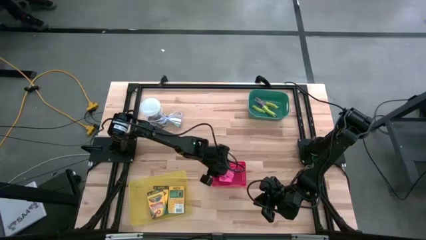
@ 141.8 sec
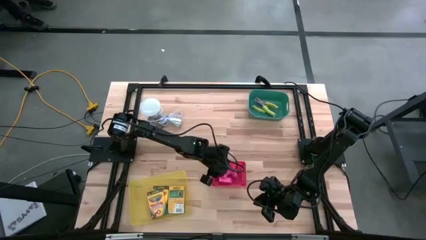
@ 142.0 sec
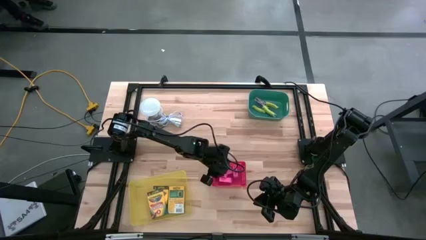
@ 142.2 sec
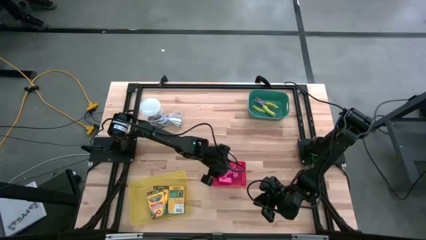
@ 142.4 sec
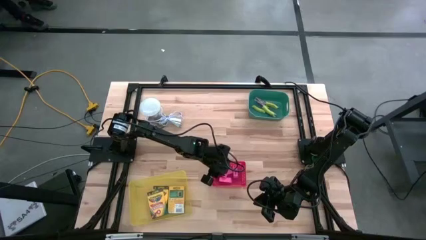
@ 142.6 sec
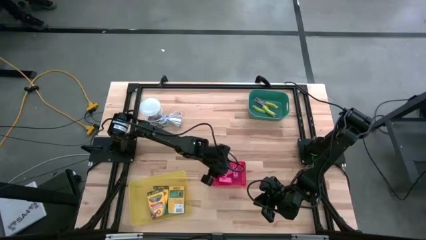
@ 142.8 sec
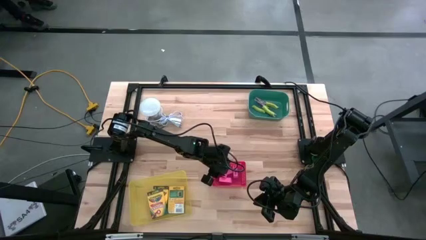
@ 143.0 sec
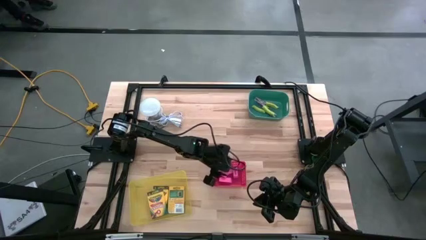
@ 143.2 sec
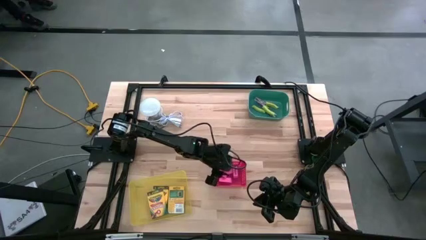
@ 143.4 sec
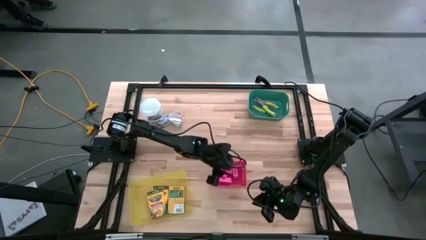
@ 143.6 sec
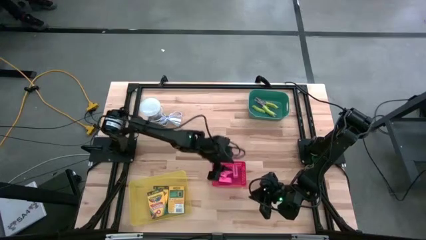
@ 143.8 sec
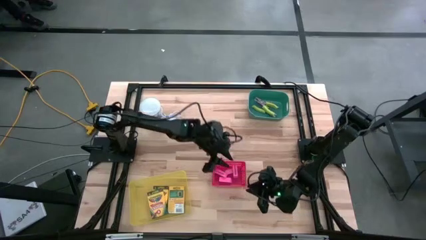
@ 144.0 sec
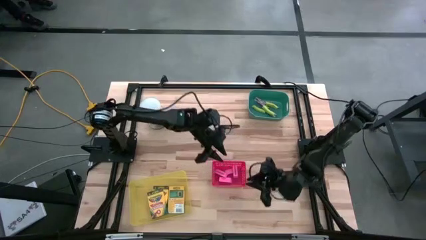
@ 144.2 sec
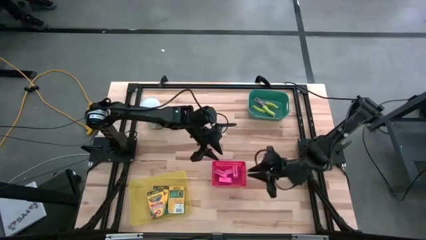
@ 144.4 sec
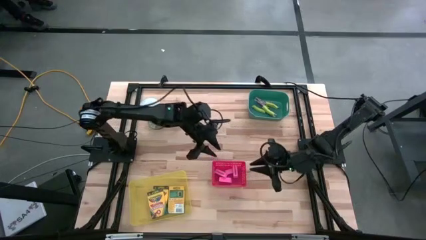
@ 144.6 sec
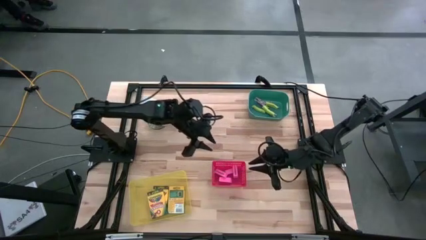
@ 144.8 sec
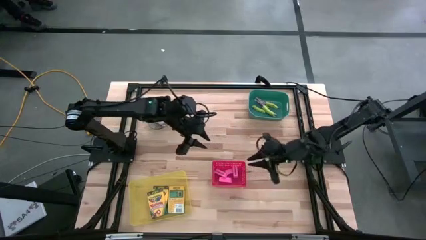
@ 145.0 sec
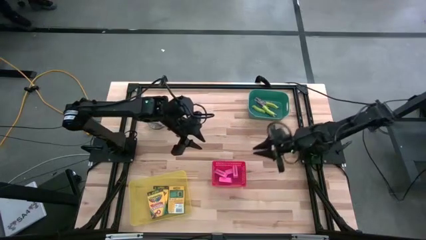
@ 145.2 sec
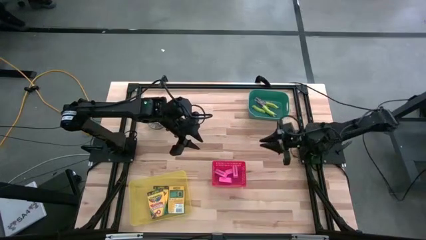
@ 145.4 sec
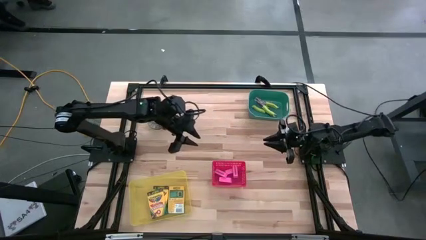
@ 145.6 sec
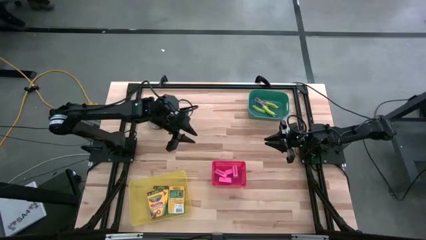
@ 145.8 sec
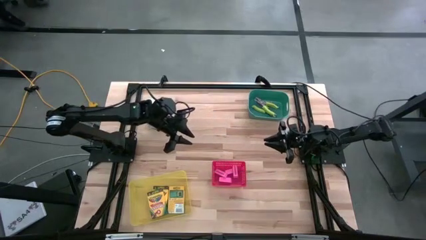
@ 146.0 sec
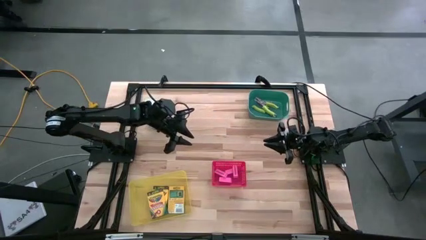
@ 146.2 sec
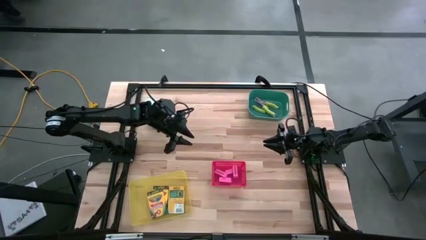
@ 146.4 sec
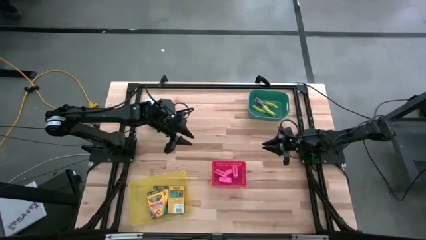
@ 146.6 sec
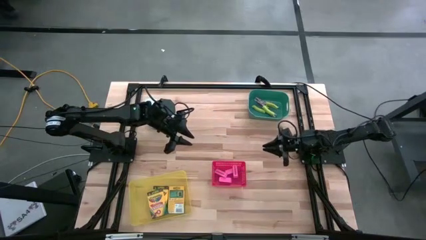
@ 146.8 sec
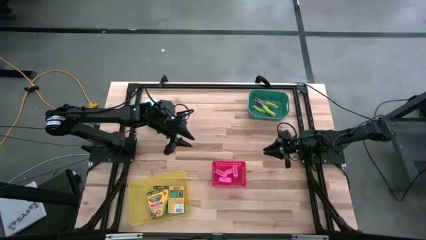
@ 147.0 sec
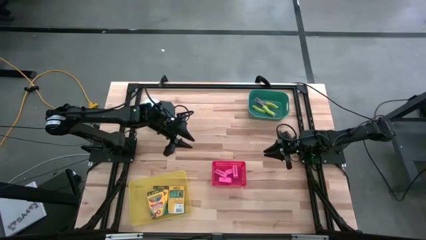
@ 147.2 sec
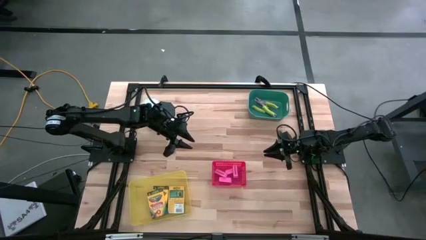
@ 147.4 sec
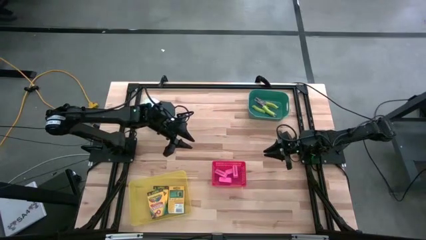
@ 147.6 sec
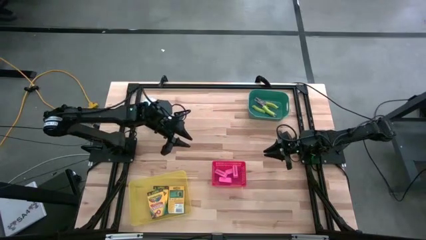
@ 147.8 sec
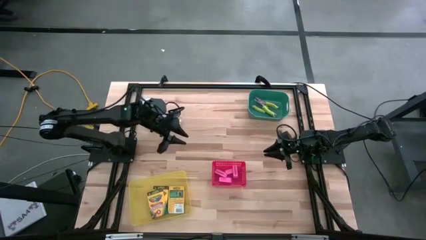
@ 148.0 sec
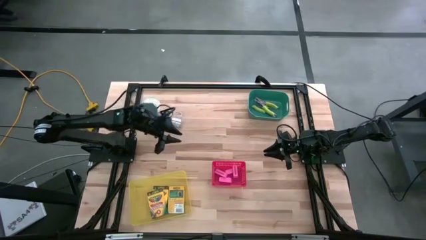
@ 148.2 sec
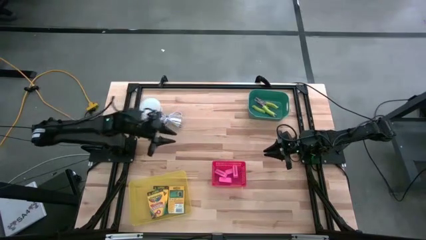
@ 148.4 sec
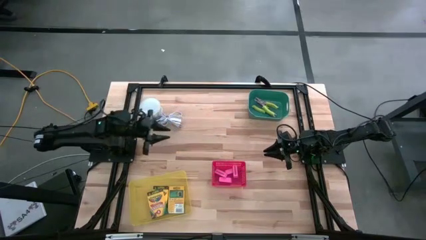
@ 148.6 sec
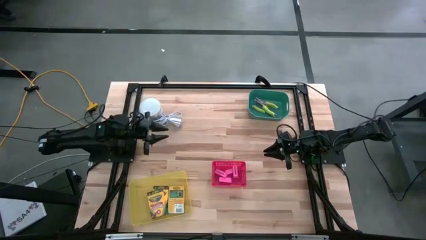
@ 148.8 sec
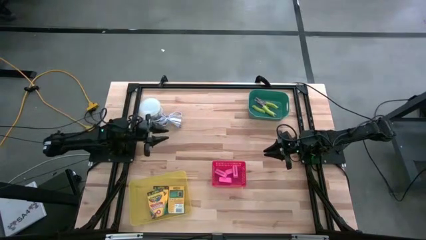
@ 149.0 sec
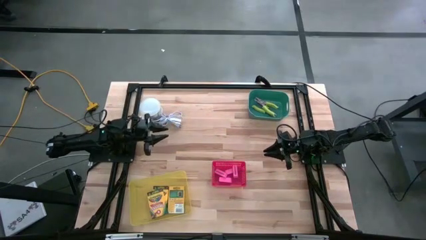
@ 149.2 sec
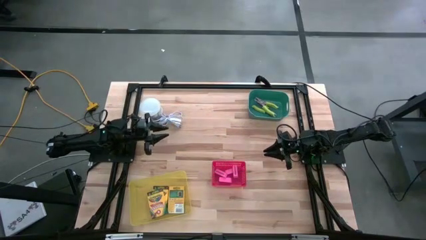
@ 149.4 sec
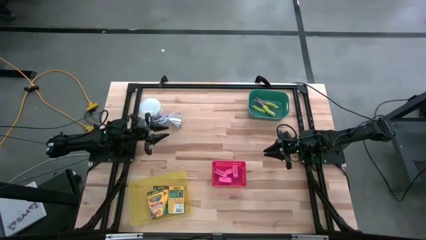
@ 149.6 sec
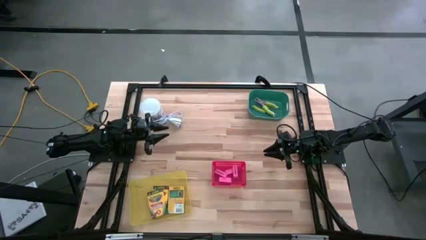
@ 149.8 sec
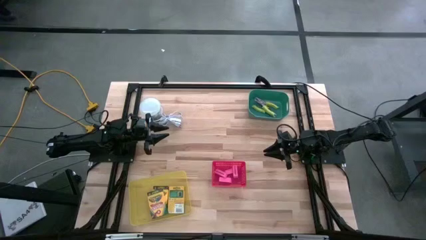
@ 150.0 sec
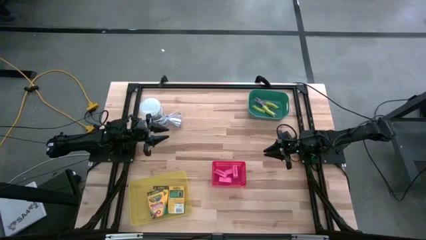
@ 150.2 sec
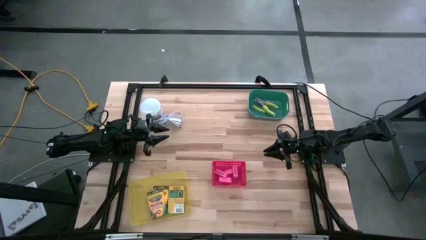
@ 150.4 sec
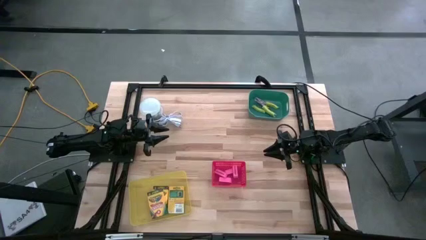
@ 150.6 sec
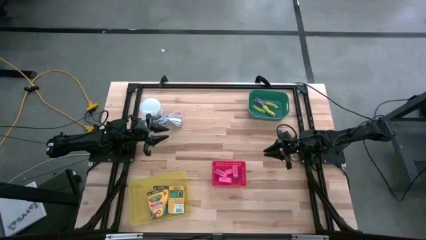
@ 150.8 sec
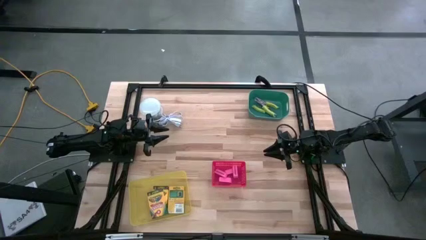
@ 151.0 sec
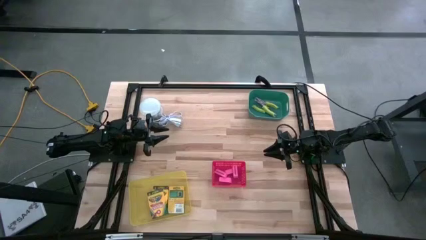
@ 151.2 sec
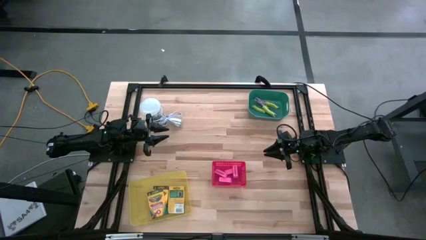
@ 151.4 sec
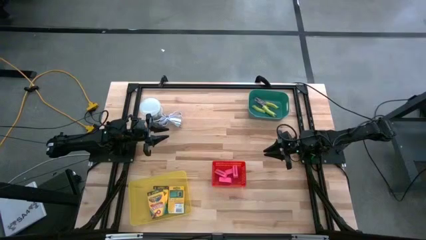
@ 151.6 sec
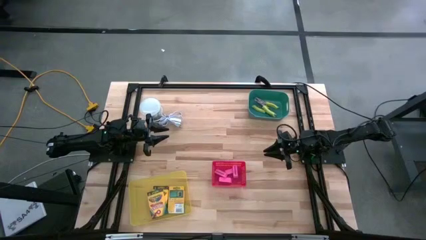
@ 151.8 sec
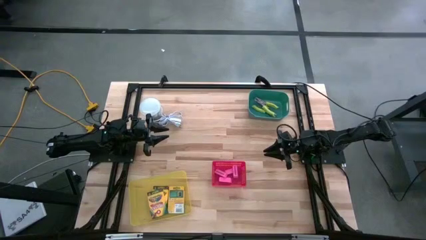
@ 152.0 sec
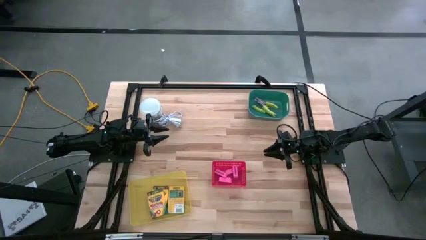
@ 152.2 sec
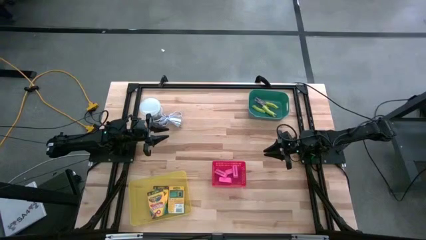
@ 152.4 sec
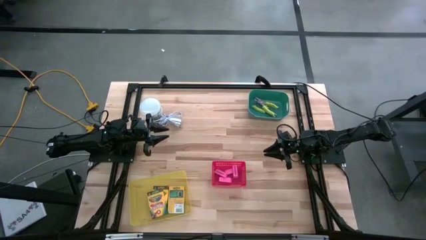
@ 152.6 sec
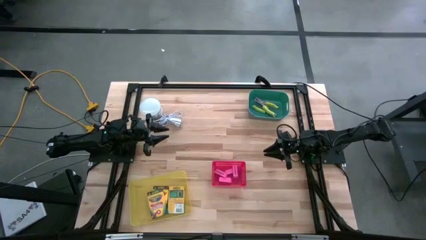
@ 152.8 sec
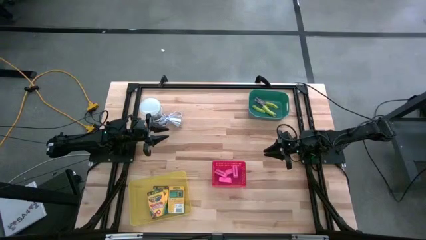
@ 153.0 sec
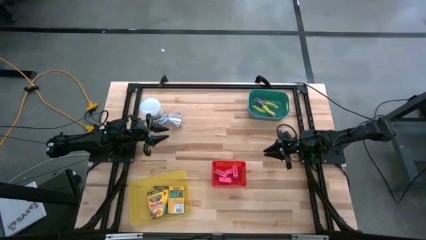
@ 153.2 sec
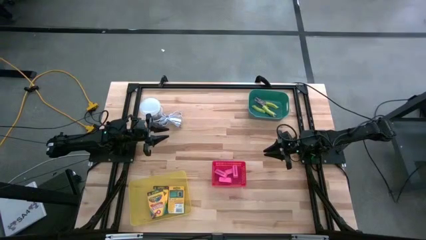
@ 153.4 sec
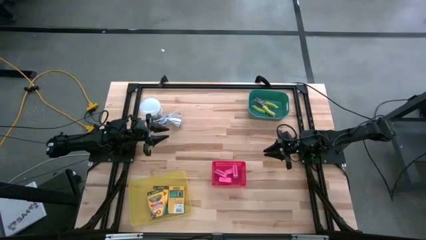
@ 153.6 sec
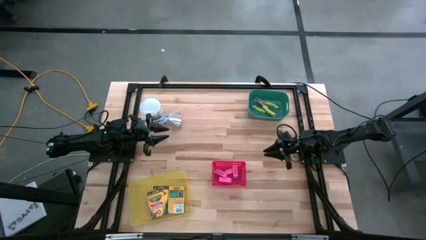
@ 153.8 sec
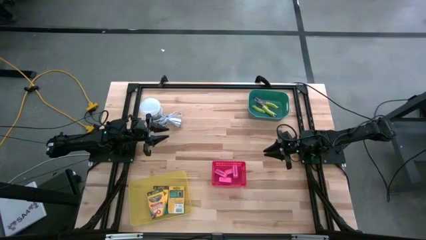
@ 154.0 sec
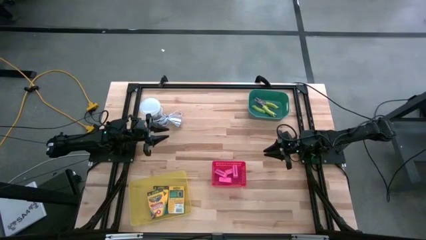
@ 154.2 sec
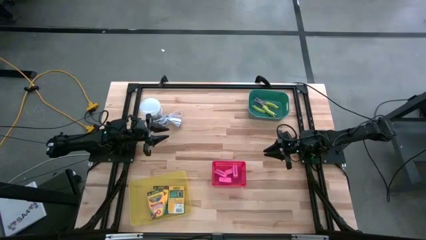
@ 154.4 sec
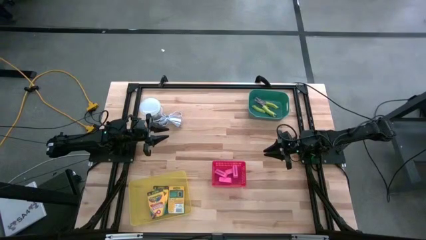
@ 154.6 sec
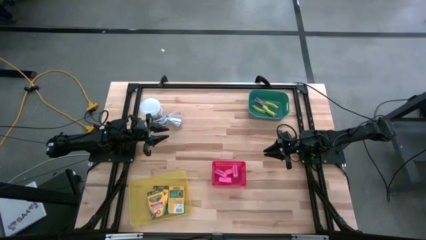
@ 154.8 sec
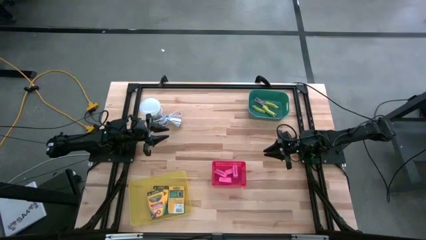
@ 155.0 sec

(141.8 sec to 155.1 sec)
Task: Pick & Place School Supplies
Return to Home Position

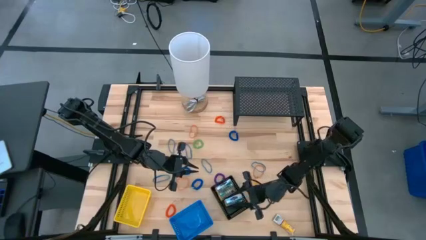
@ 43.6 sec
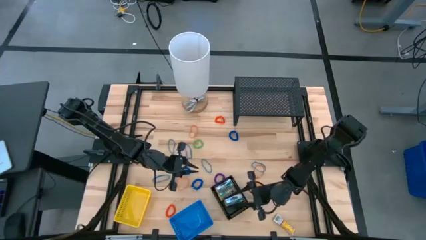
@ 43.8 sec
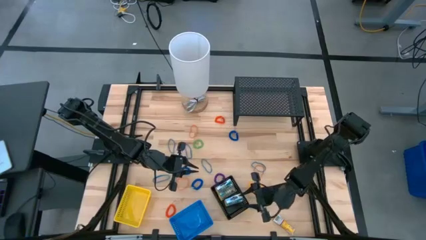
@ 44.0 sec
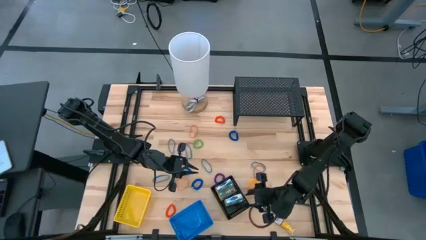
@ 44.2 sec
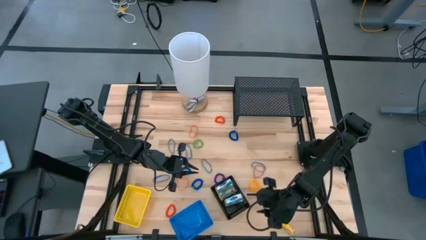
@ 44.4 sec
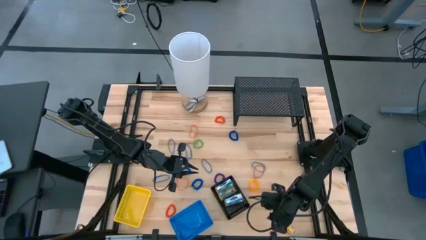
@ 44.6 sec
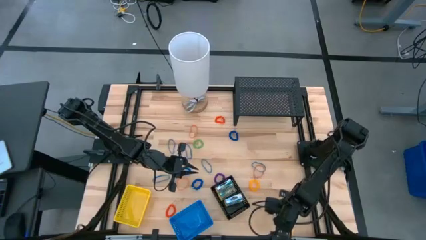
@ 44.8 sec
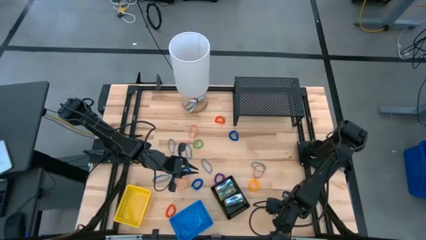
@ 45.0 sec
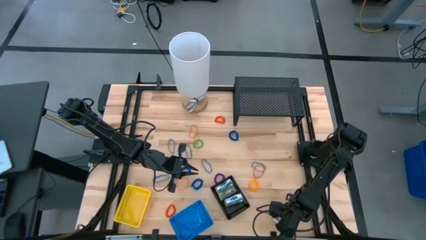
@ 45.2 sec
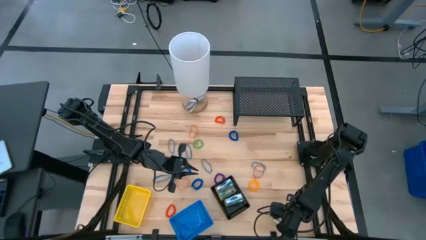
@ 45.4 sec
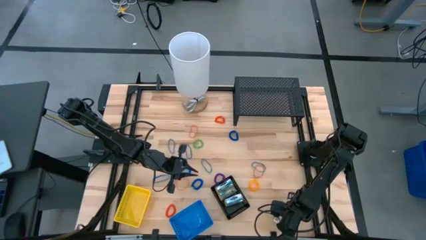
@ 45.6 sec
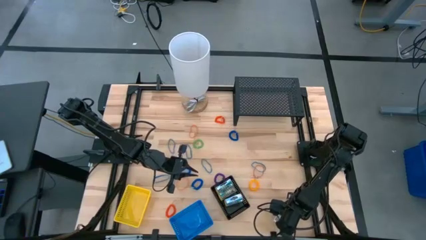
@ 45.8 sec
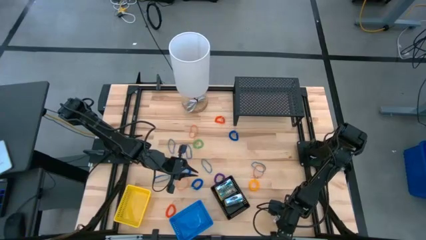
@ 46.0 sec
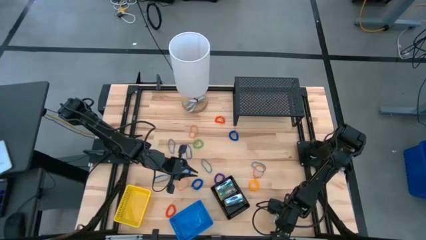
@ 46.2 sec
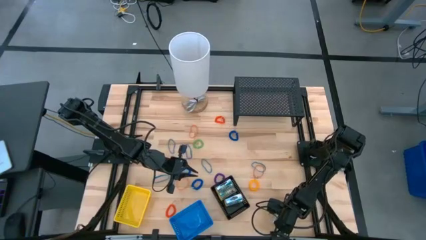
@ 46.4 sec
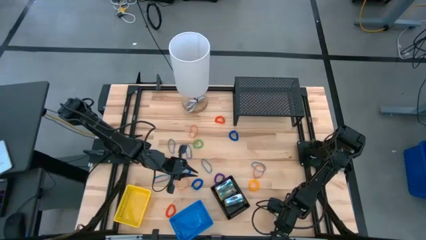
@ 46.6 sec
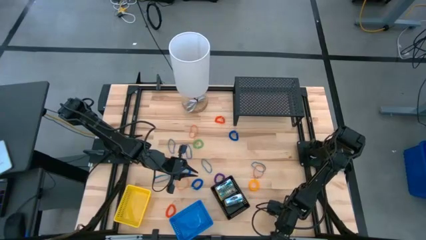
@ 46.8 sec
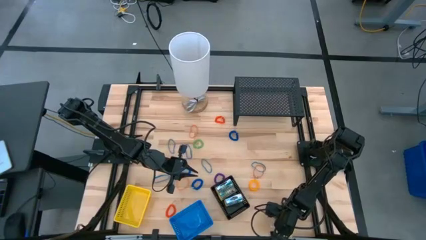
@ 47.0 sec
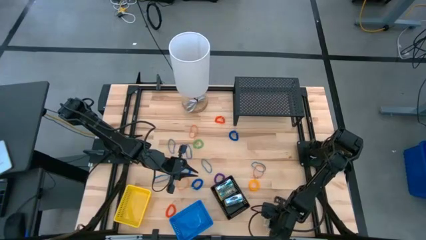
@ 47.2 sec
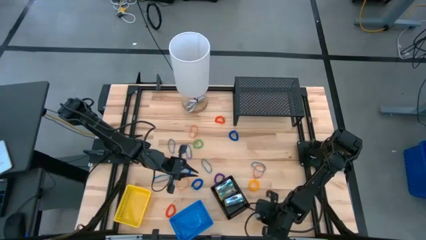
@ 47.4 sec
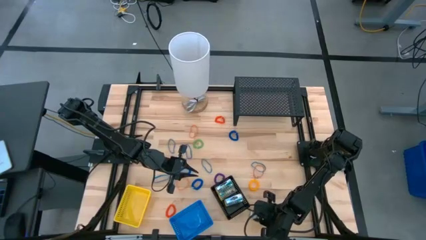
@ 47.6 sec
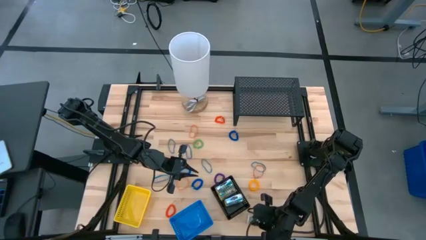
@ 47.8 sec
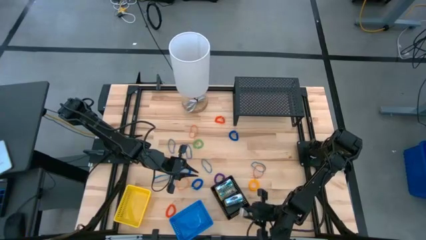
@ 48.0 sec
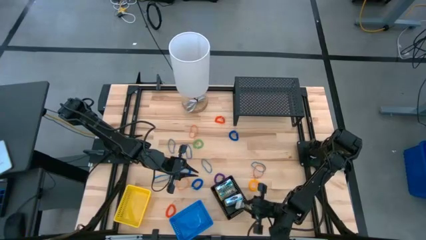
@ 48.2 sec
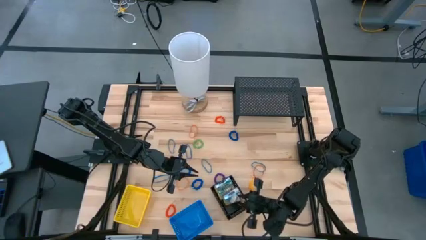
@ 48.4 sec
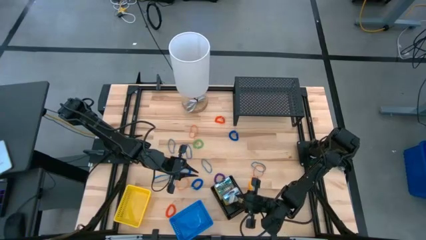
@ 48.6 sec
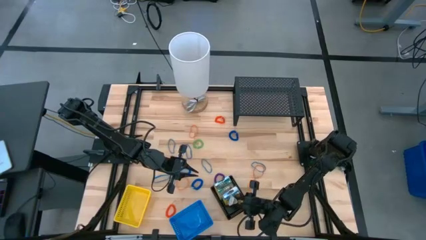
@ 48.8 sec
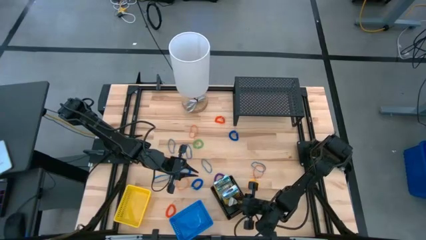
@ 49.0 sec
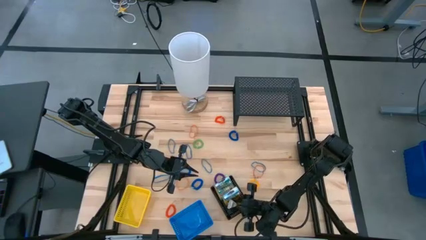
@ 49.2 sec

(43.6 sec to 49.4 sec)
Task: Pick & Place Office Desk Supplies
Put the yellow crayon box into the black bin
